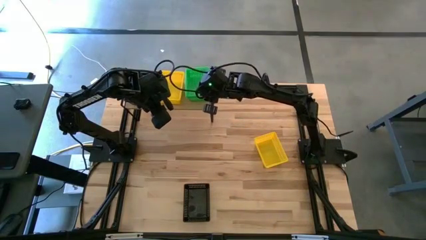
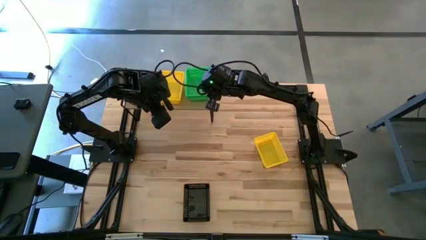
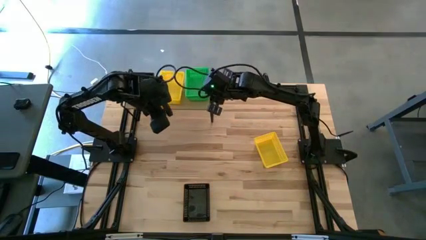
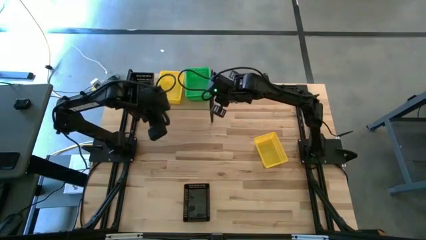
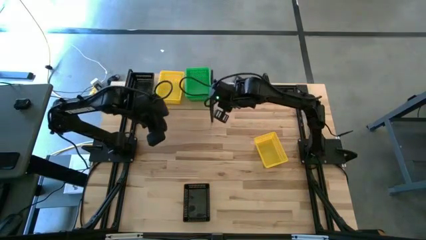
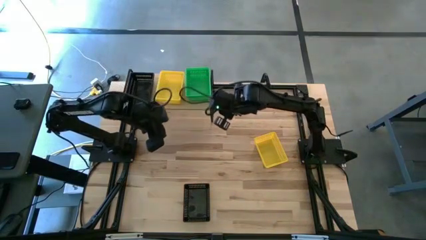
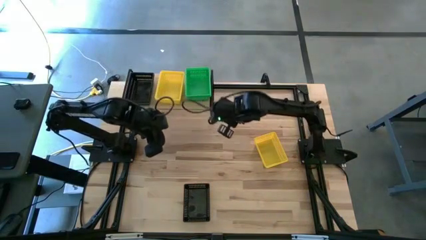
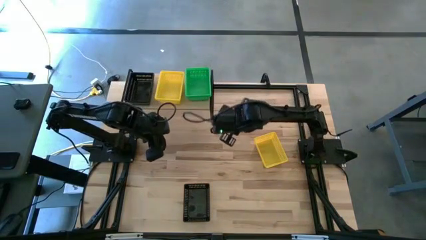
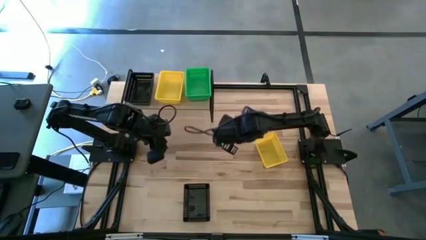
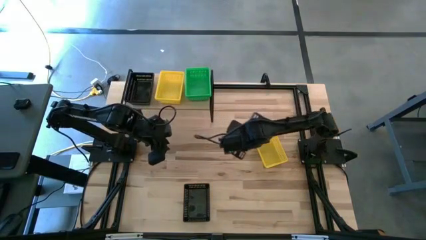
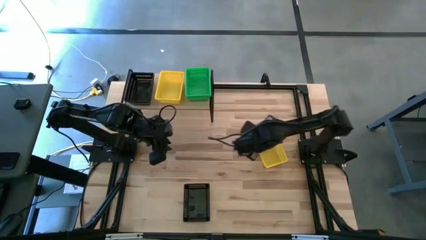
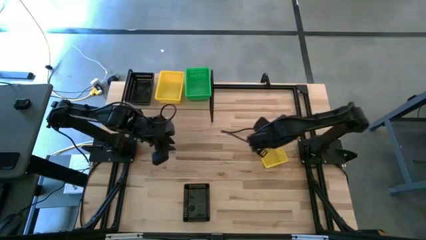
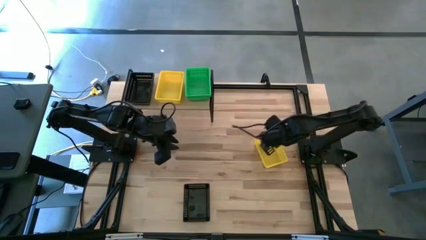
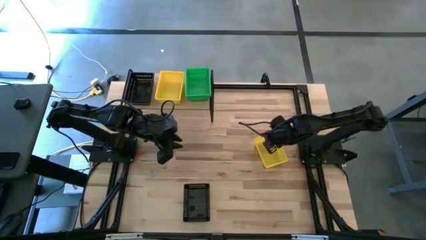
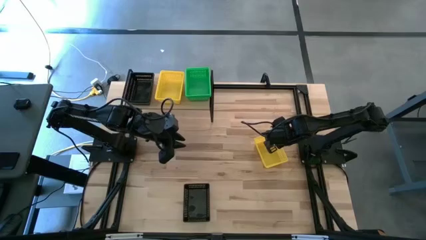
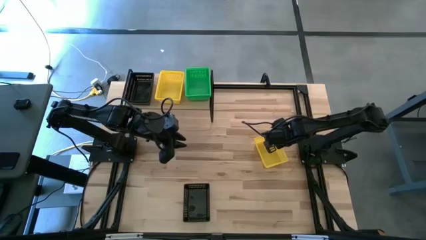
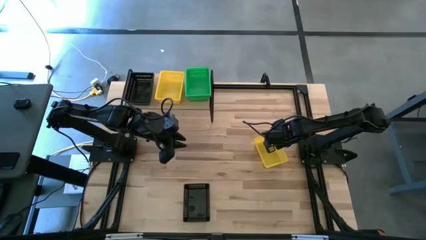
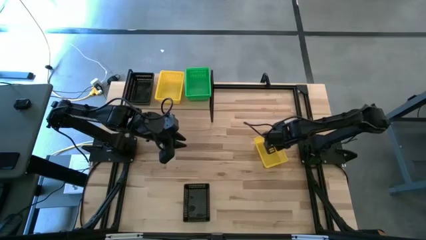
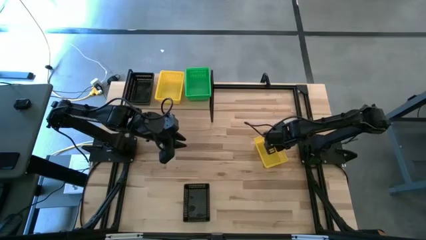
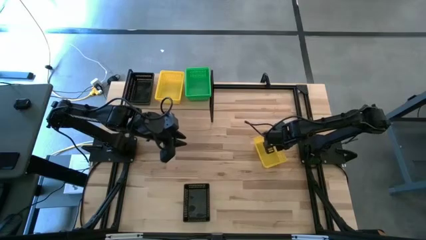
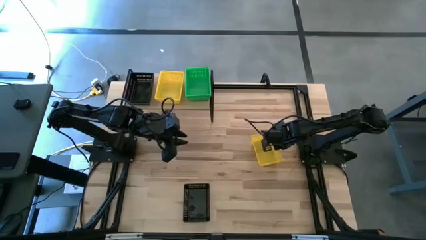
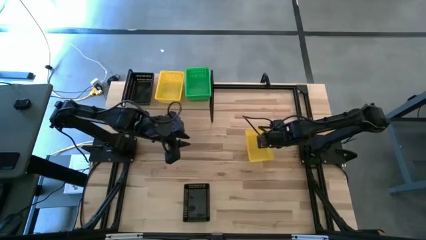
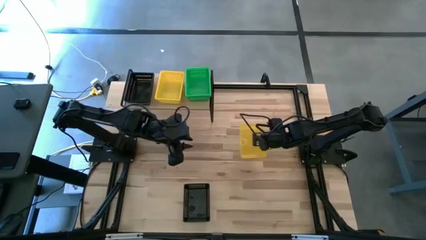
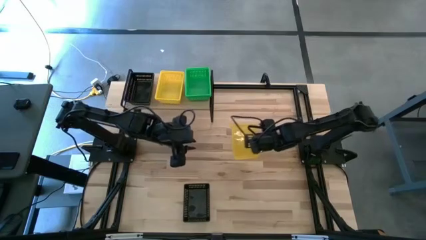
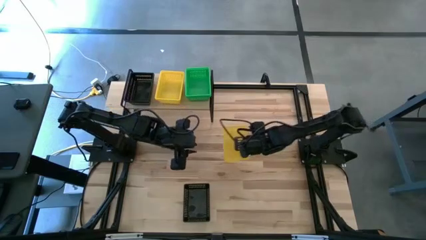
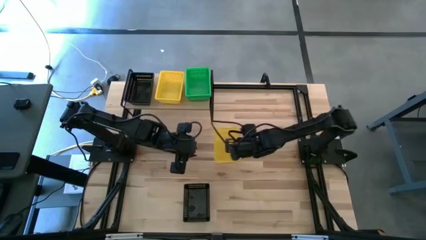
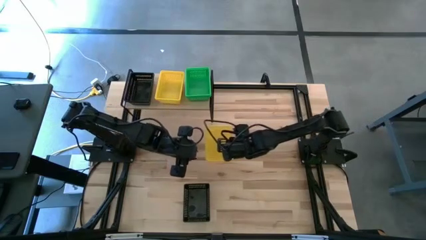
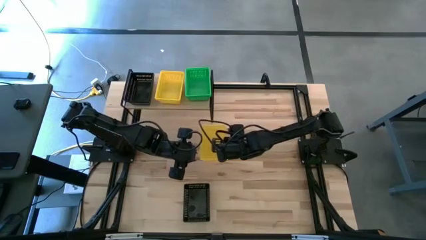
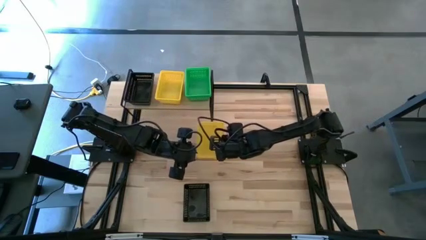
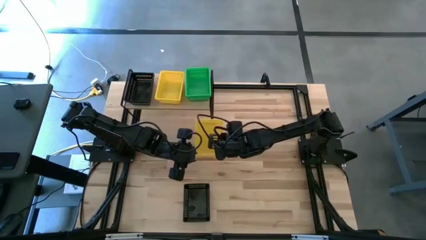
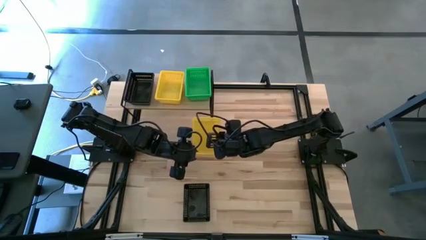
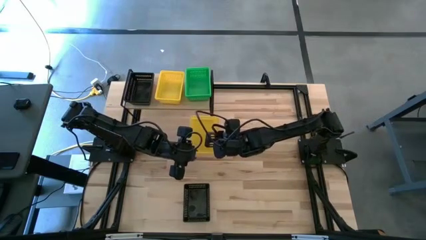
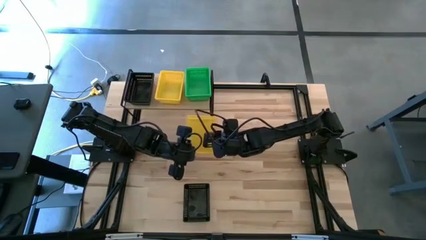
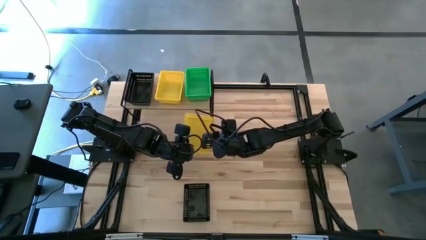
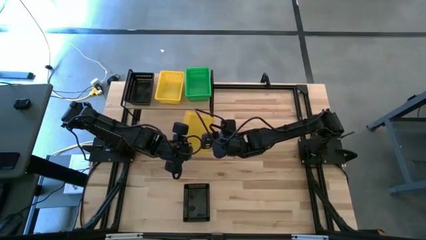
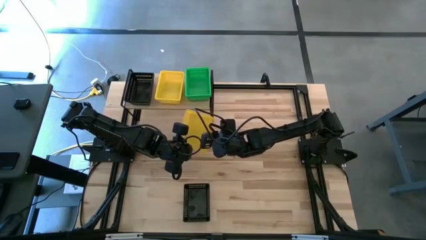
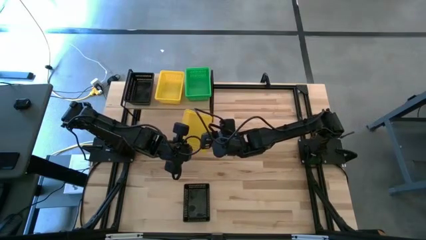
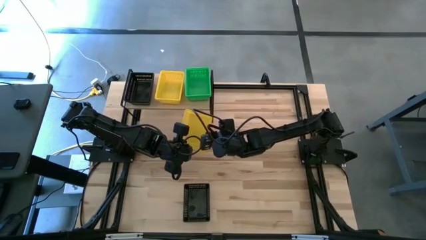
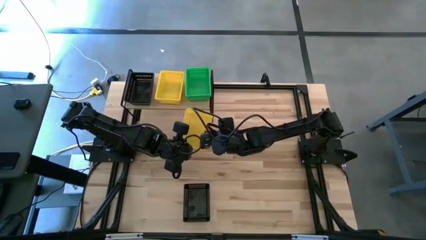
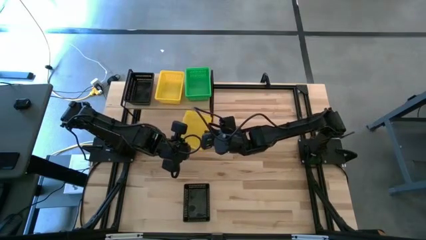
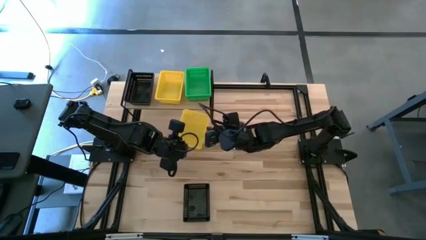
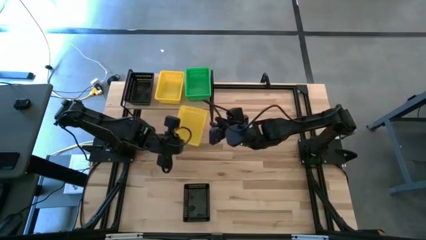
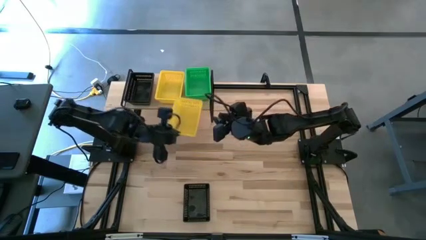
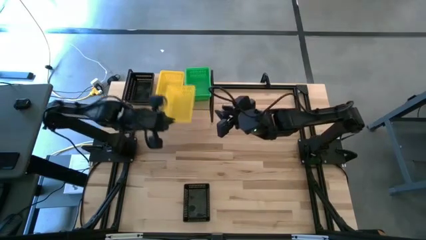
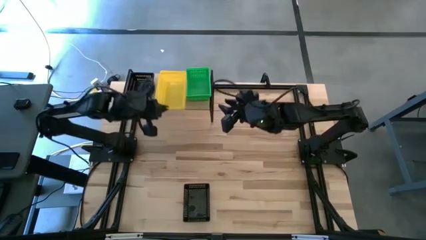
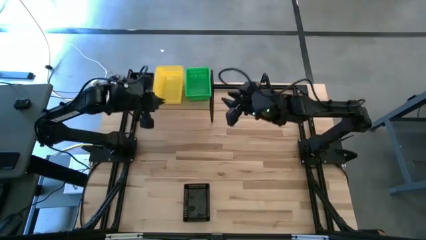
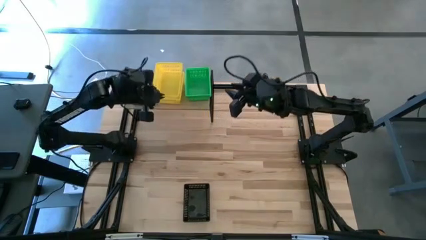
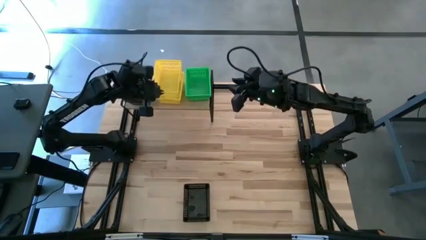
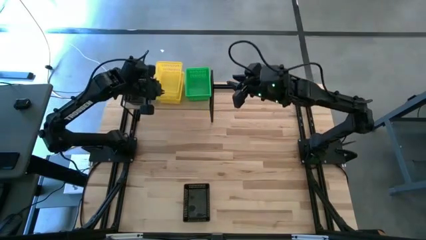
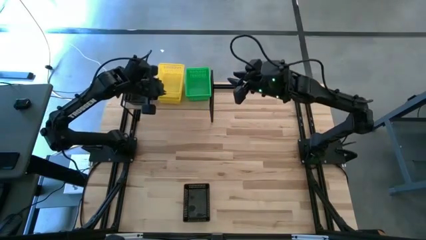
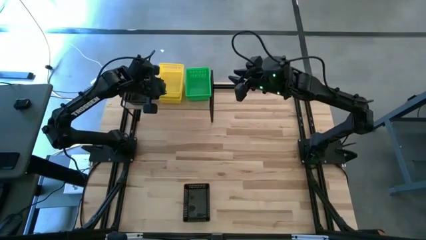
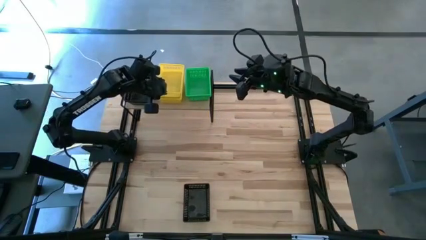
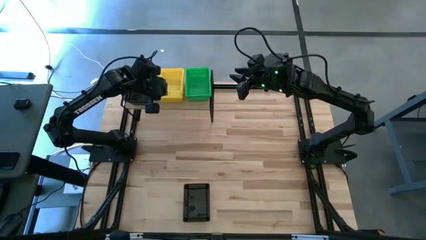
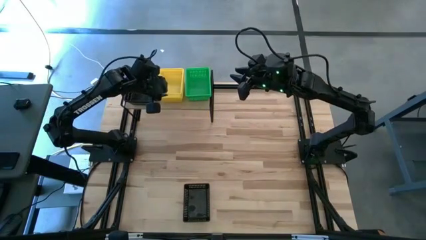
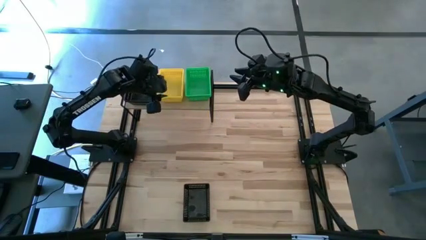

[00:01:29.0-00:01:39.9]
Task: Stack baskets on shelf by color
Stack the yellow bin on top of the yellow bin
